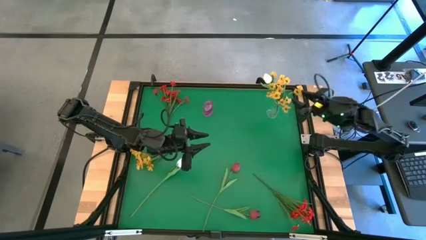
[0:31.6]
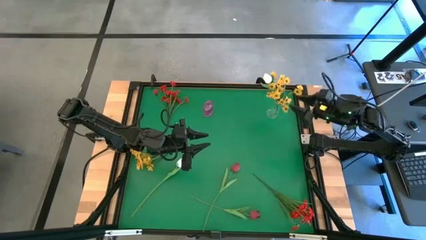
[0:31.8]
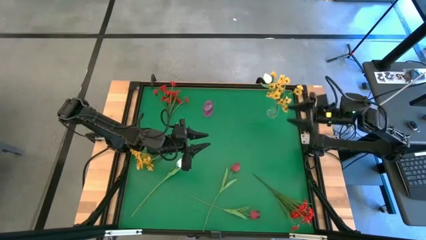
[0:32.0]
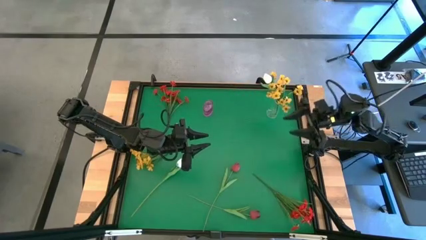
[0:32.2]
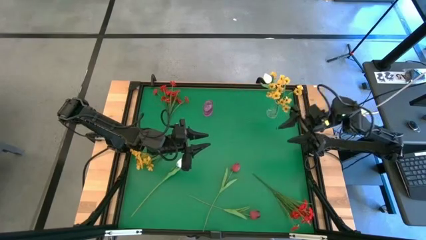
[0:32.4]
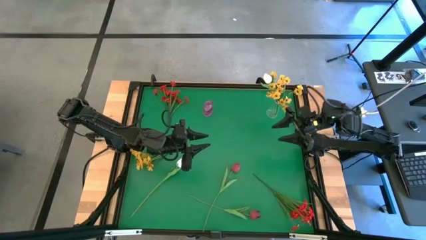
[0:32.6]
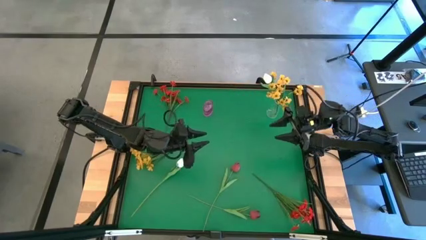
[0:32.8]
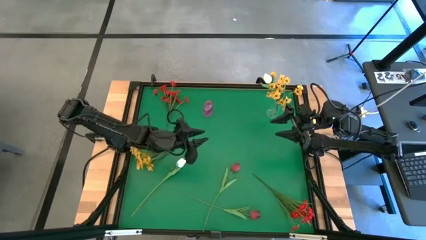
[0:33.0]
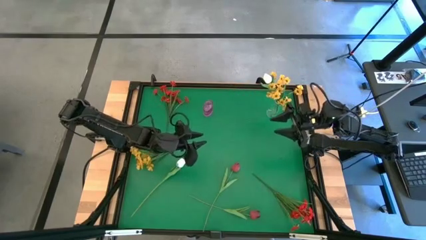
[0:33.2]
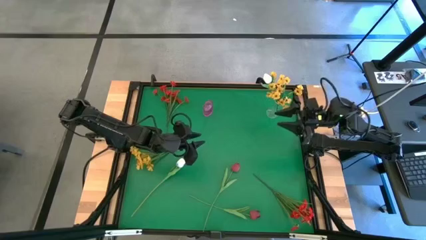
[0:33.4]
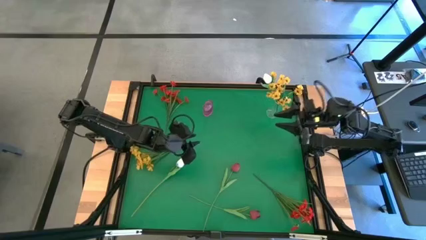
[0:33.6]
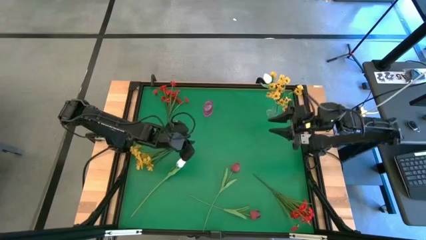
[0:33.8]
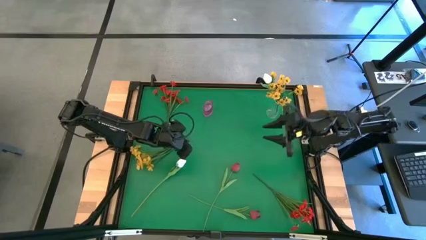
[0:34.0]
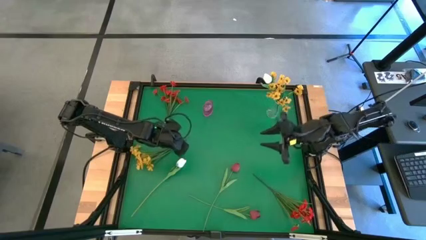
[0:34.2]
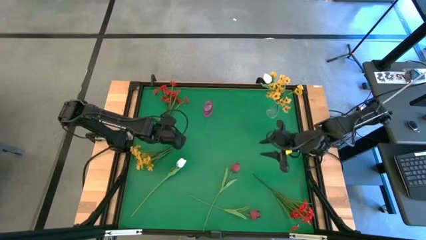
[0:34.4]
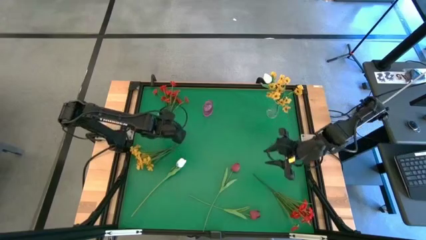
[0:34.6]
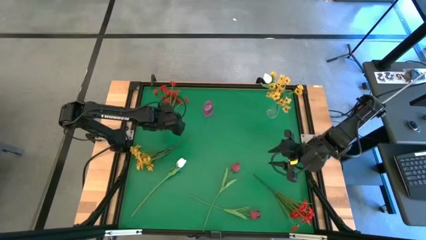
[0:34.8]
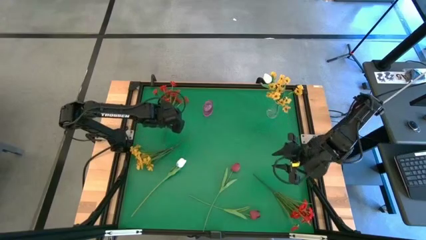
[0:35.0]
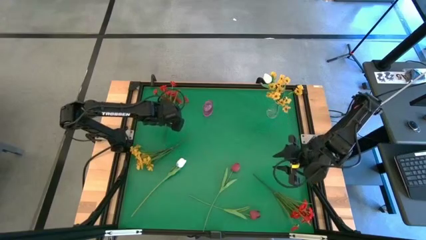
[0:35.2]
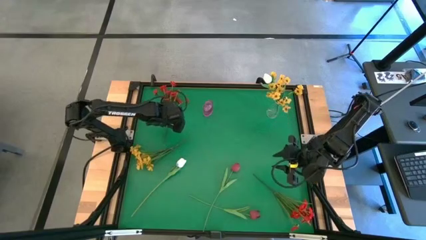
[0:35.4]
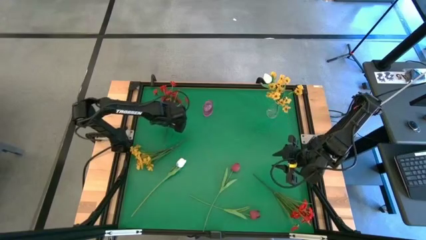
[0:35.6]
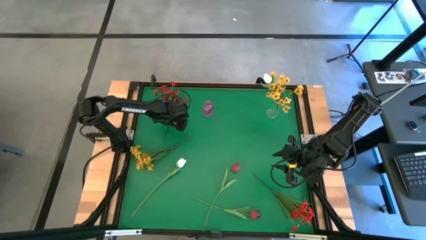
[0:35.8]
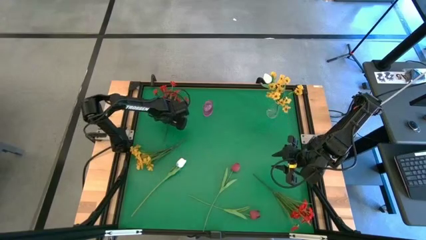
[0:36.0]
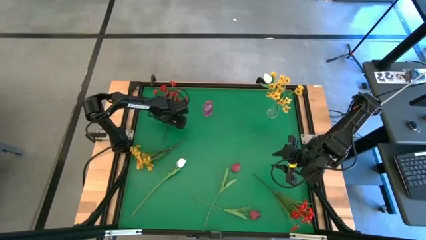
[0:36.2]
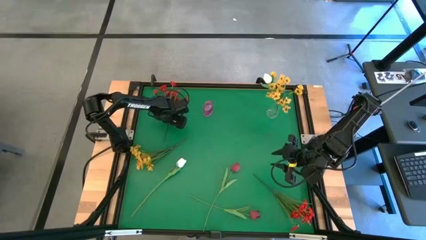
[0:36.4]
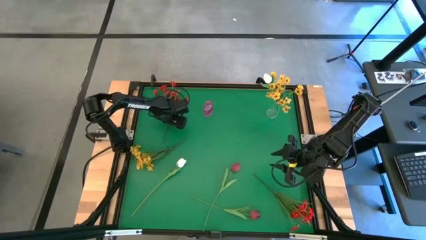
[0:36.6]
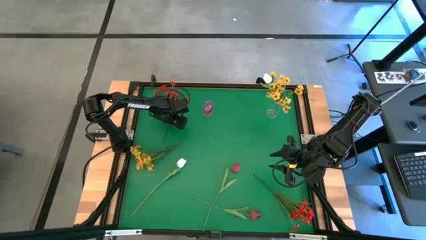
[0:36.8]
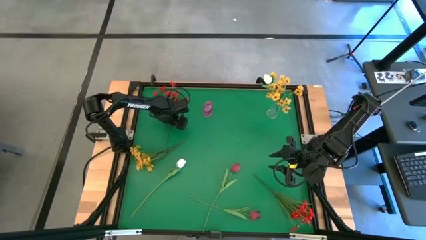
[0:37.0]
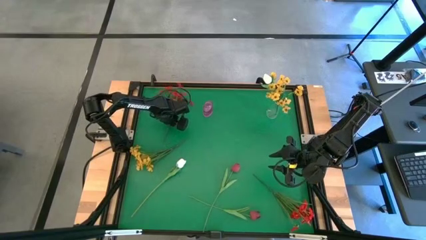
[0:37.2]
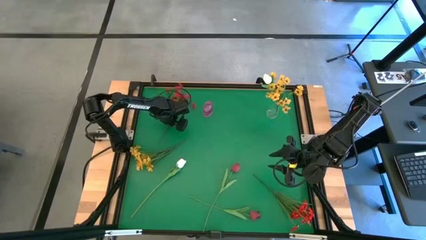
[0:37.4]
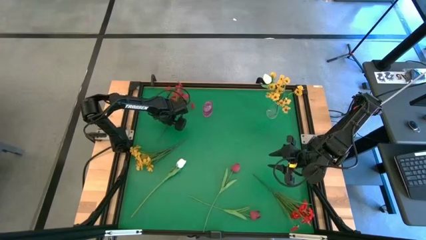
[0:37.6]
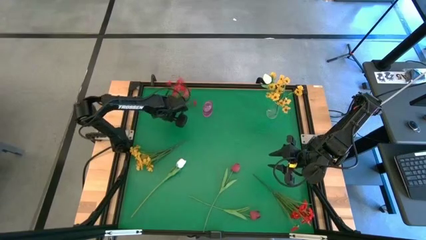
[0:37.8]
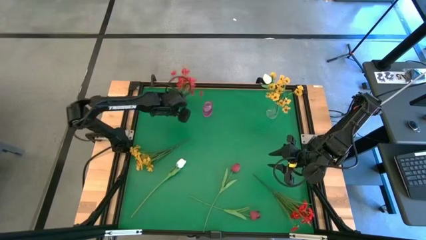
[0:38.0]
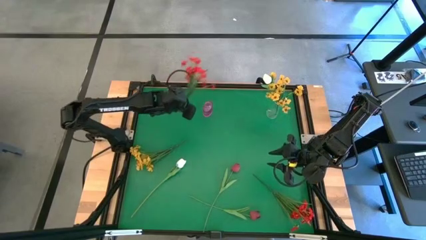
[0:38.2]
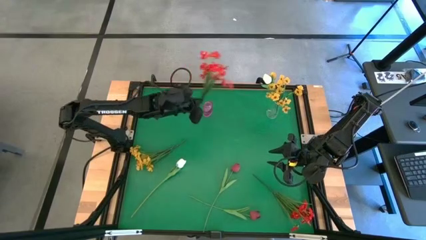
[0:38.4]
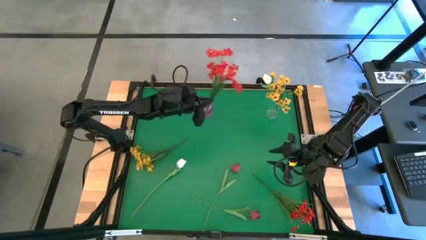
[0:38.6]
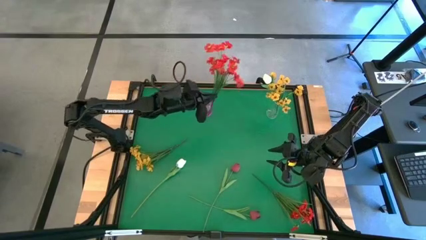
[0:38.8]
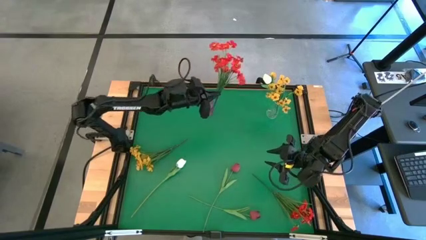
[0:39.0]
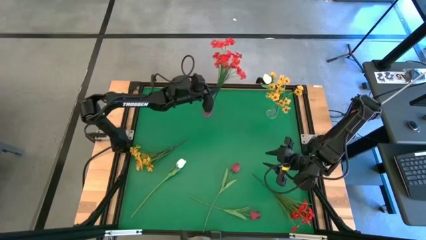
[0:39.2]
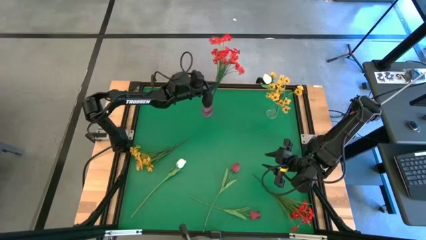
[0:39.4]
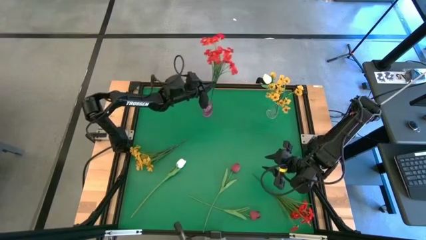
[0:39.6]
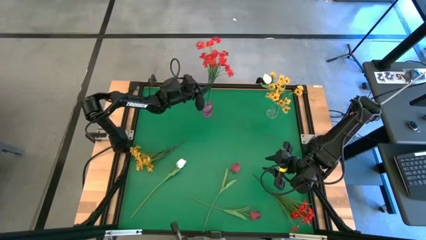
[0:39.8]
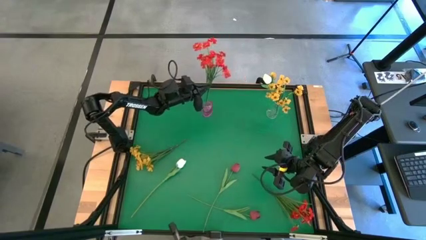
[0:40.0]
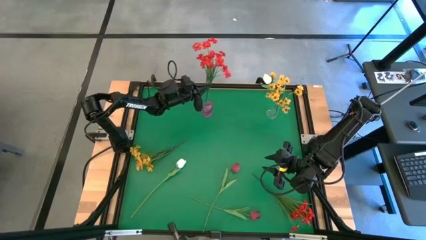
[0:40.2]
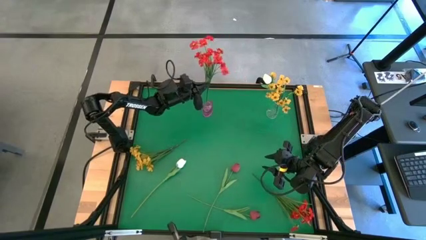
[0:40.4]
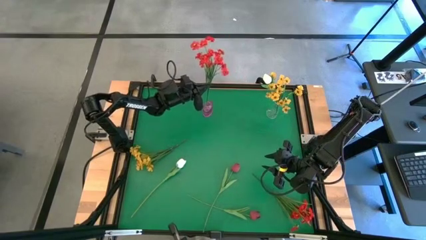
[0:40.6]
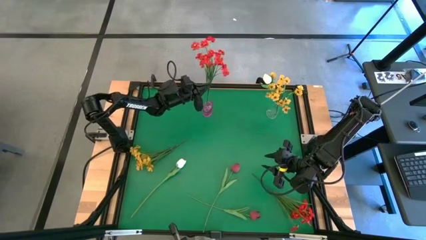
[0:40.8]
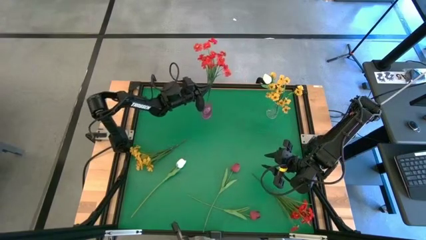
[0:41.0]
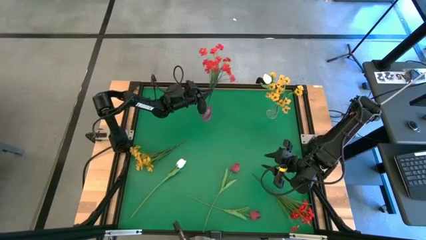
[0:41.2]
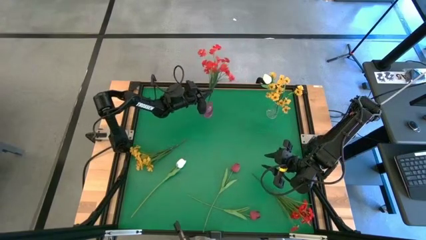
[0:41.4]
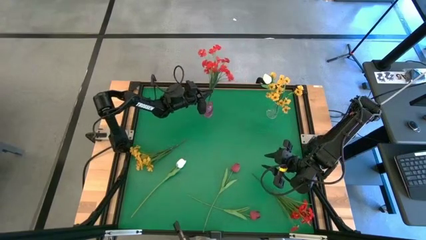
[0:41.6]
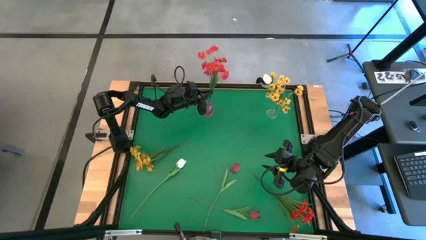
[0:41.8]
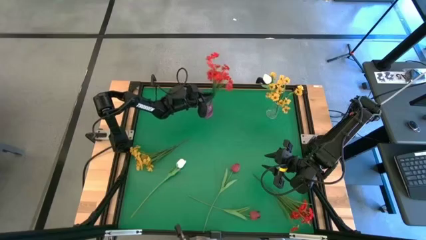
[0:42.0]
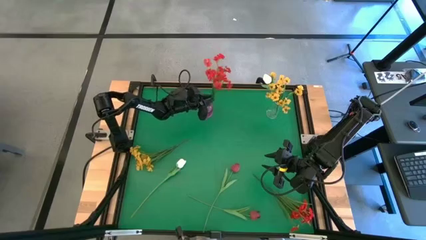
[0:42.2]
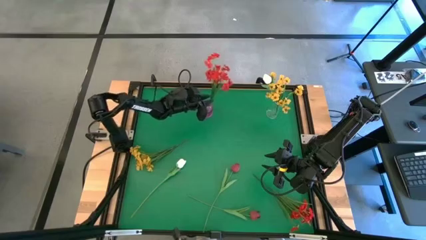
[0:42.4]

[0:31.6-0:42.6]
Task: Sort flowers into vase by color
Put the top red flowers into the pink vase

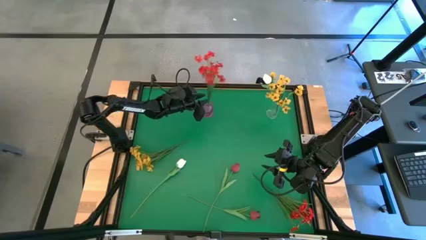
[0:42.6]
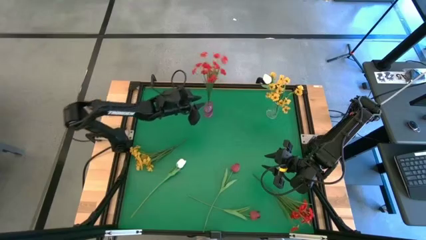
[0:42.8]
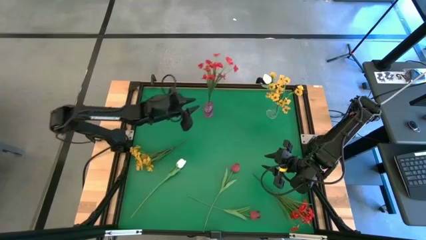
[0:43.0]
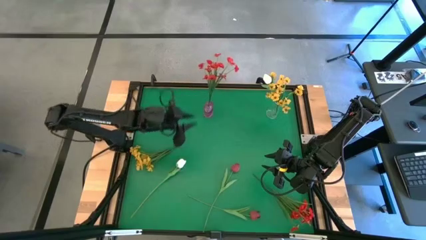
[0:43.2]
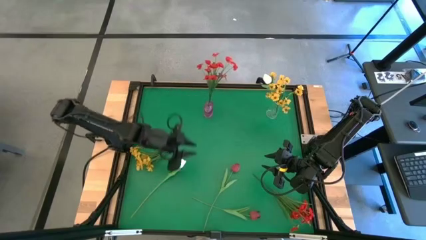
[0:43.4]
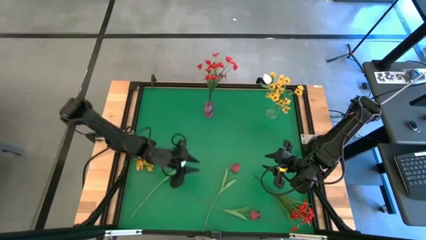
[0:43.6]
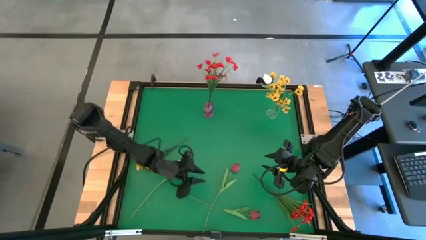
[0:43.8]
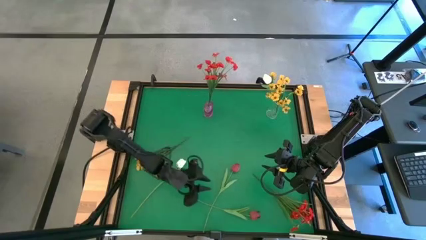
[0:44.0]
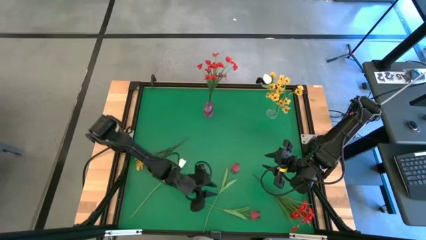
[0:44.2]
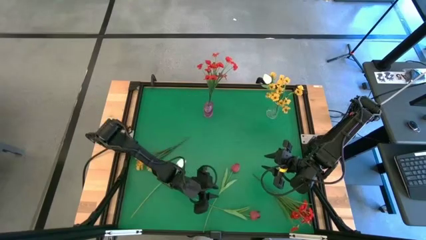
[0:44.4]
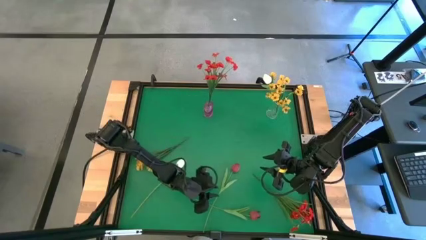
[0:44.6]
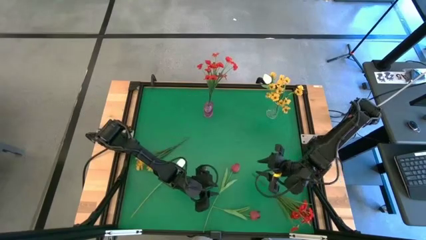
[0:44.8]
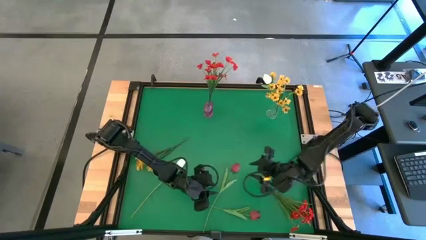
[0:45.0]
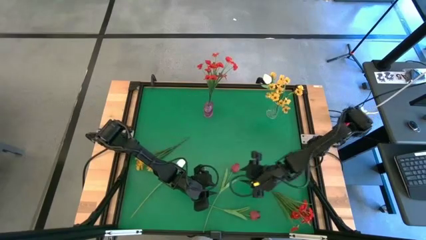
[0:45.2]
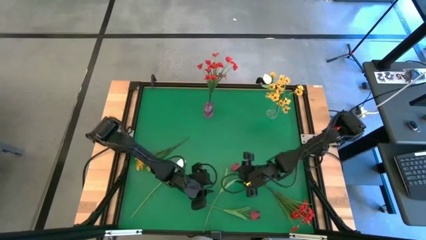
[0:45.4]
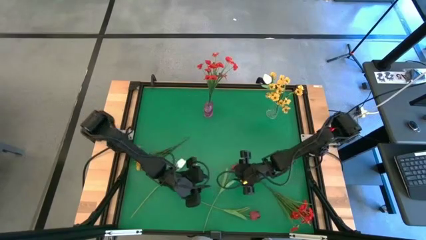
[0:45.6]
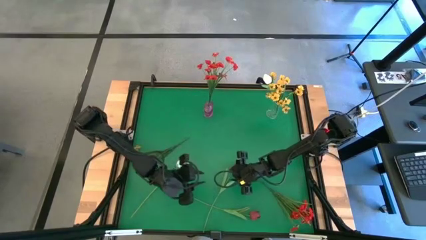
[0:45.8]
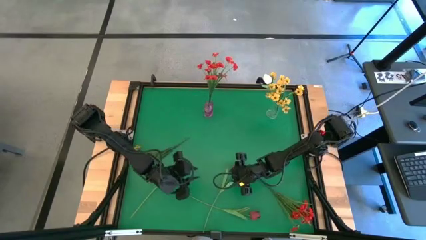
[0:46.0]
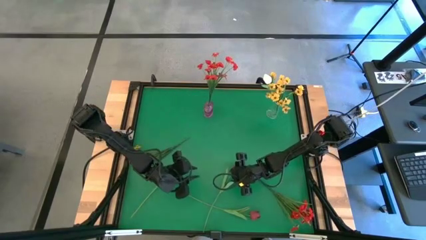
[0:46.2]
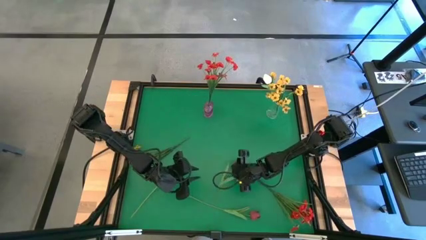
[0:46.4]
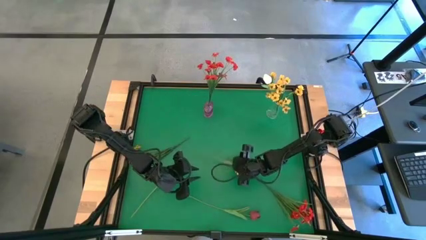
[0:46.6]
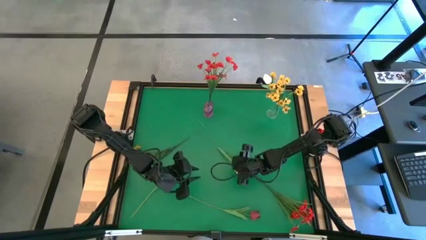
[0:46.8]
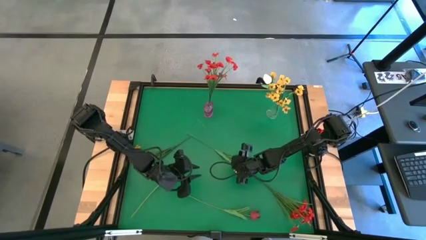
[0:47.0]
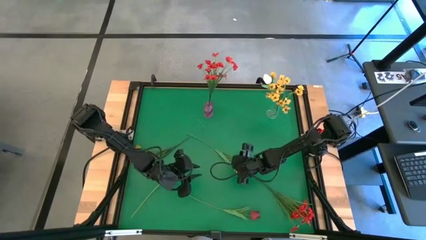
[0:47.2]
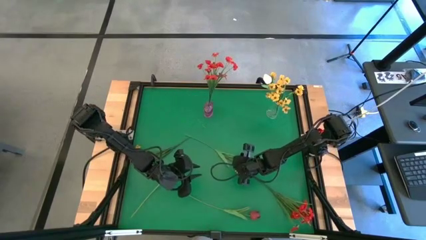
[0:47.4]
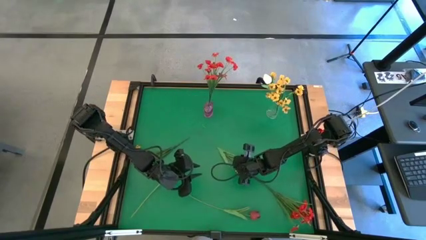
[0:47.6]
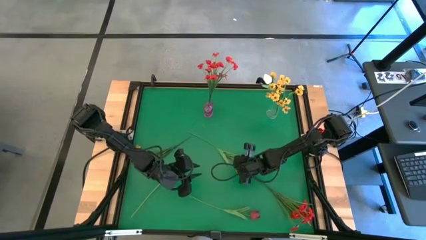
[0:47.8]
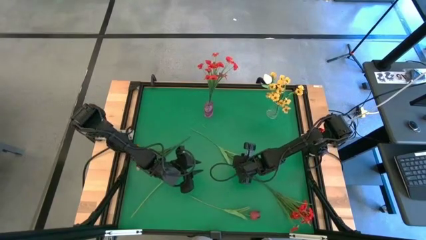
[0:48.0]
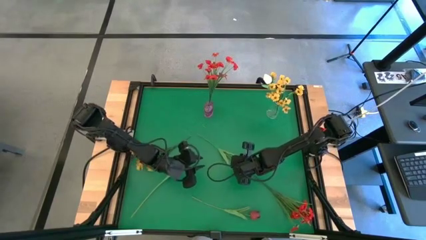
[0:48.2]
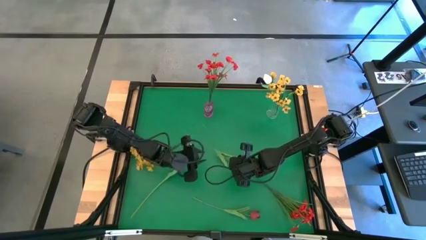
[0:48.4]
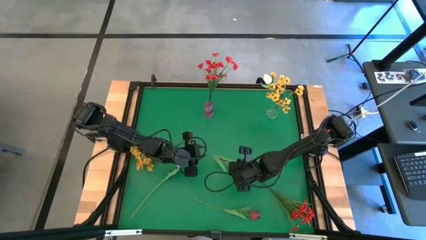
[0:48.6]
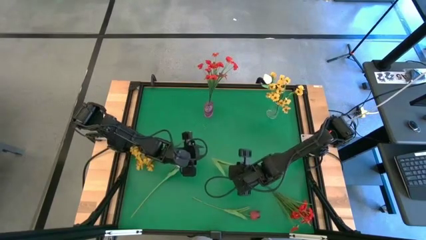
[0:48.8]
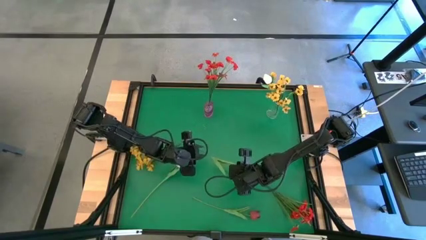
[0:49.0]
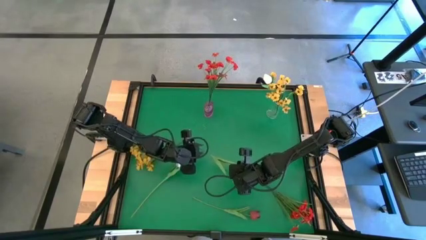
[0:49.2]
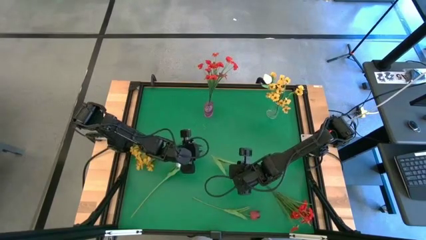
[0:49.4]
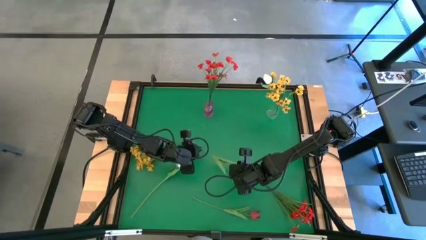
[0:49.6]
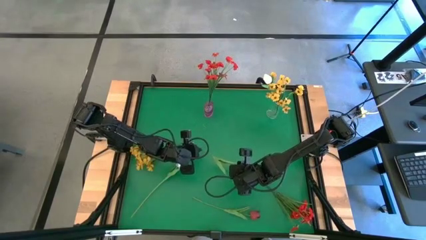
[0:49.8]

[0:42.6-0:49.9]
Put the top red flower into the pink vase
